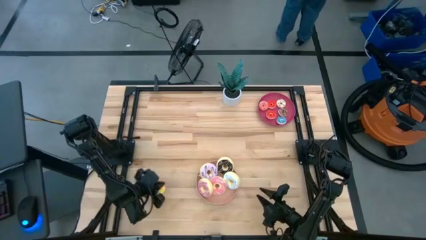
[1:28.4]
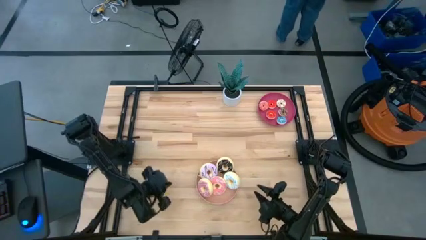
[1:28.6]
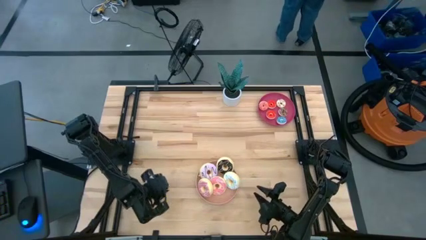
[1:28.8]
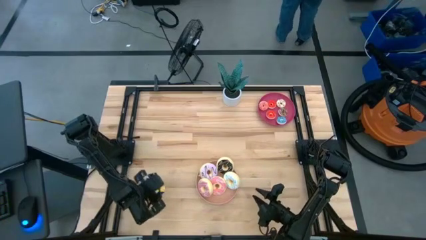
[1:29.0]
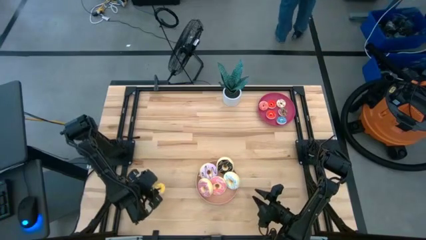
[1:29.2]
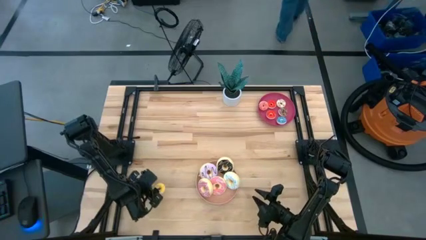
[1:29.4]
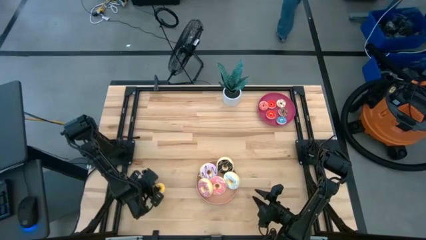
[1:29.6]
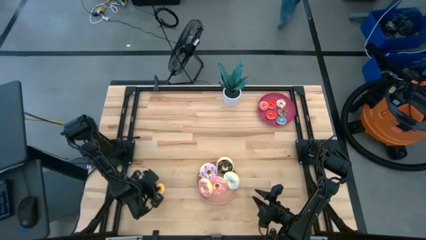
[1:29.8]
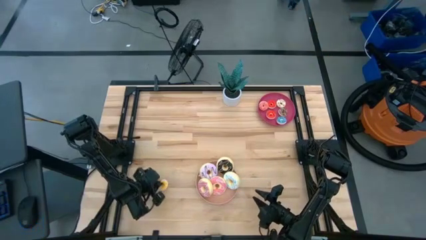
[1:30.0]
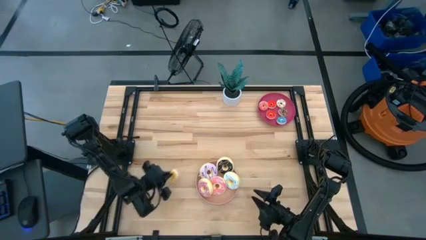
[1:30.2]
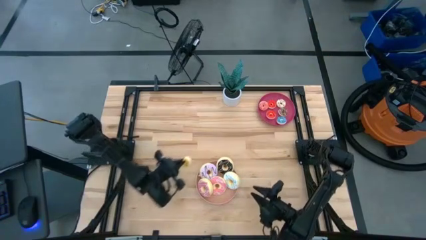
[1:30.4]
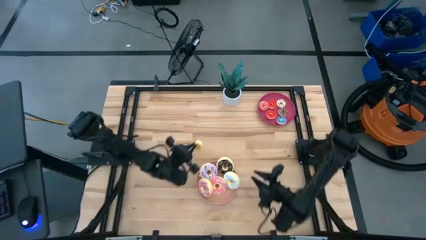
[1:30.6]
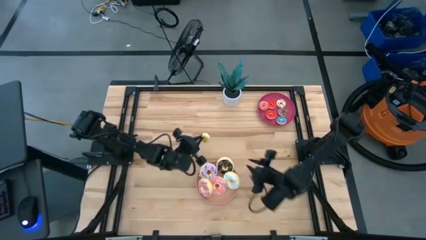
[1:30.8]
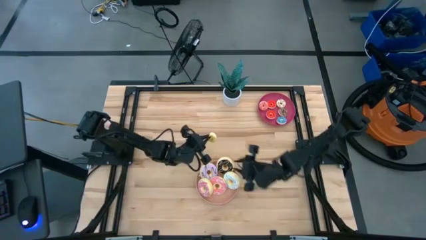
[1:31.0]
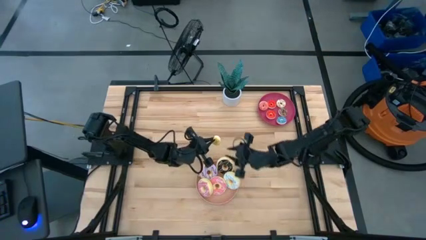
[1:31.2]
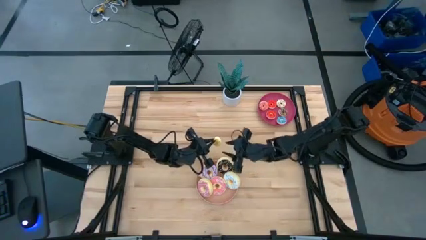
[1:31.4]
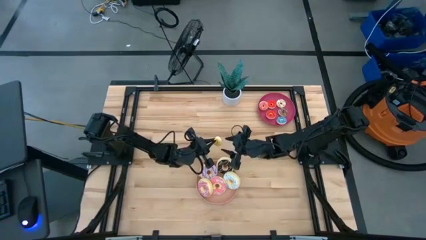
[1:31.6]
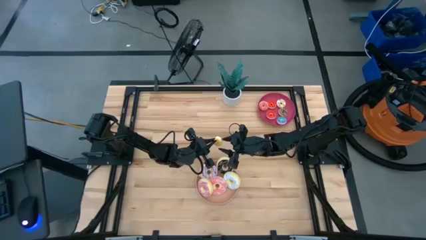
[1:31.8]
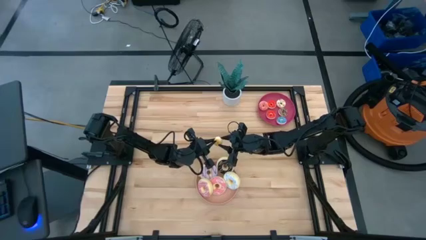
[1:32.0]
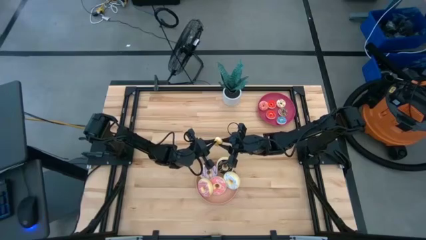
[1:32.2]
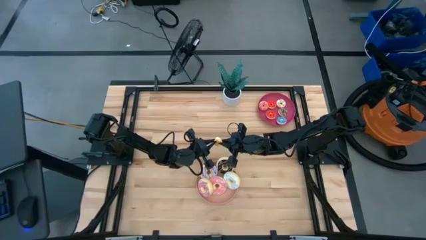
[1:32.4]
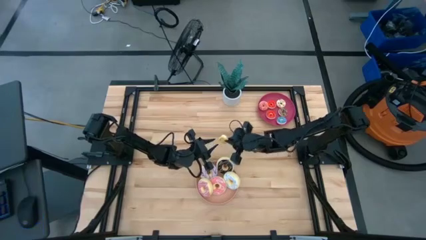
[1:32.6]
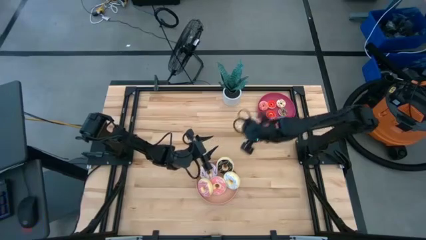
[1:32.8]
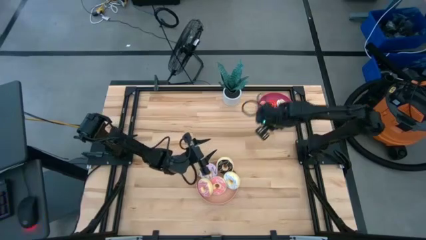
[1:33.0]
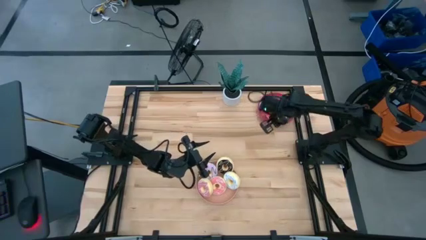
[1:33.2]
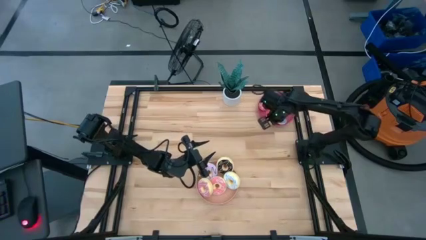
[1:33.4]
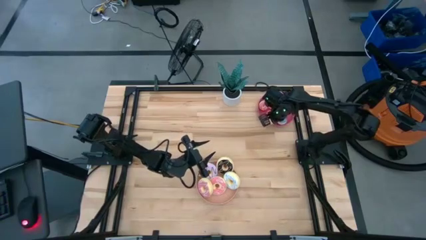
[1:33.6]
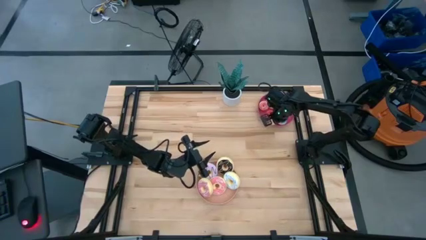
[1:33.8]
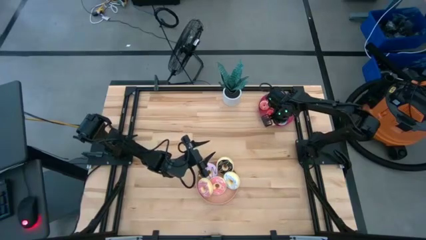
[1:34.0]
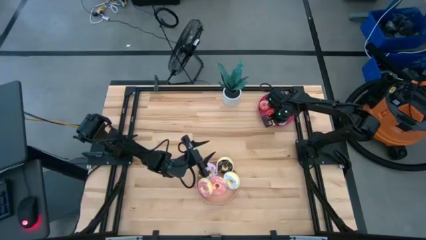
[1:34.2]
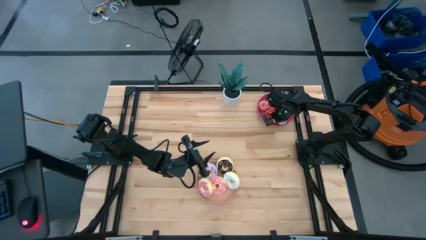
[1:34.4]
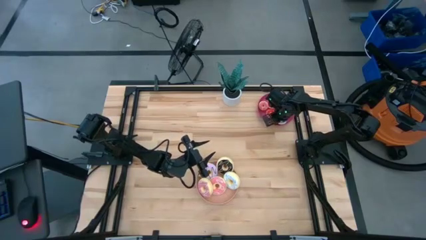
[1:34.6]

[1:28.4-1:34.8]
Task: Pick & Place donuts
Put the small yellow donut on the red plate

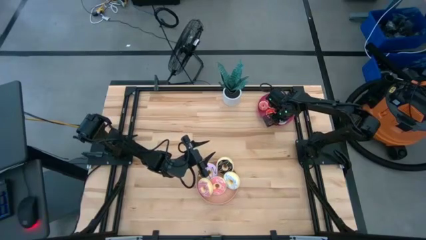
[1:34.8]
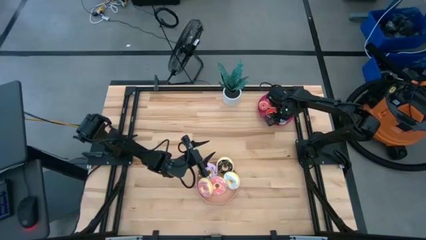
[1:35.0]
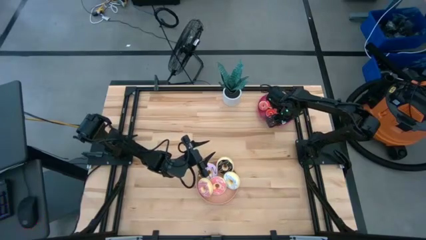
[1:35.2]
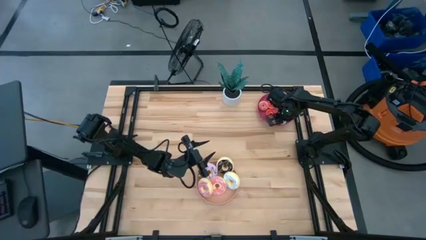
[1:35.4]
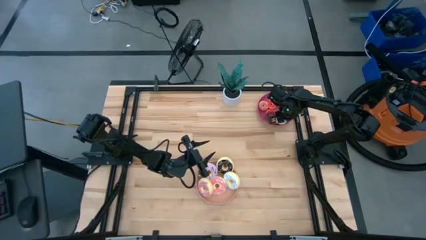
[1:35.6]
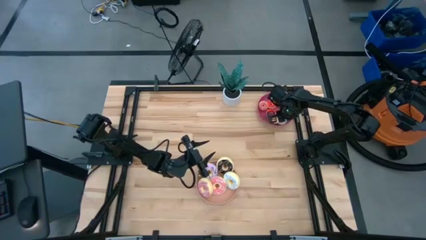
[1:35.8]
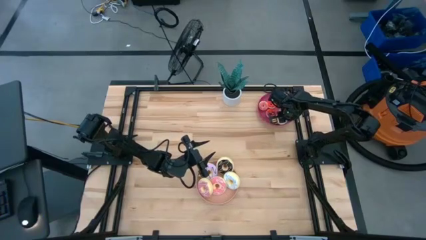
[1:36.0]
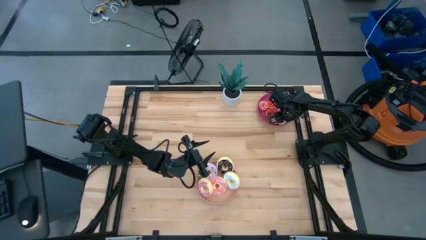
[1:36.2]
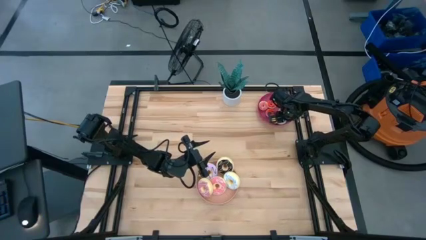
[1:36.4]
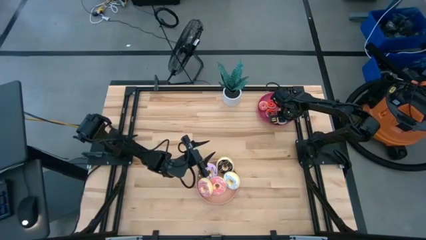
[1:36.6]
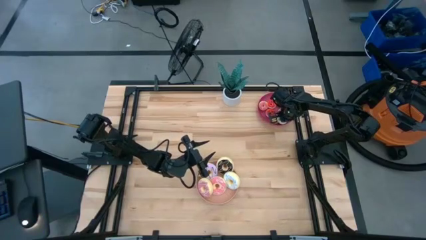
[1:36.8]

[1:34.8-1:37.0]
Adjust the small blue donut on the red plate

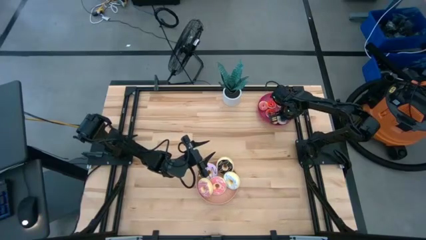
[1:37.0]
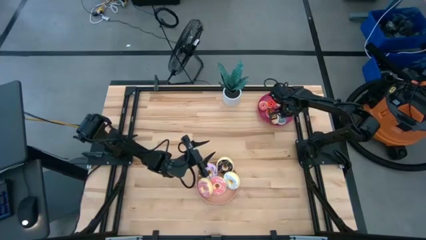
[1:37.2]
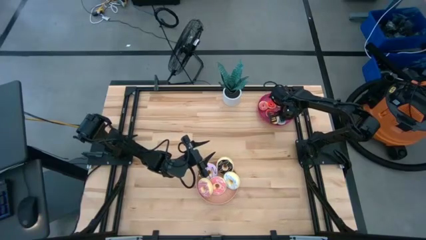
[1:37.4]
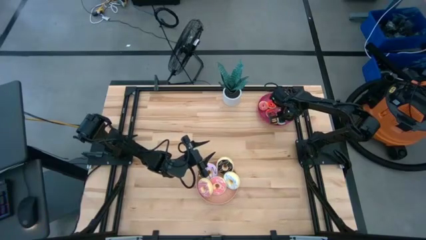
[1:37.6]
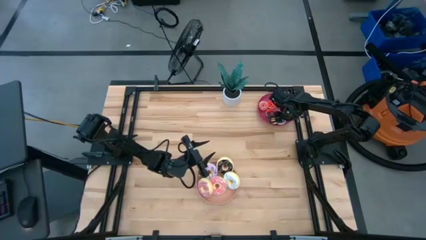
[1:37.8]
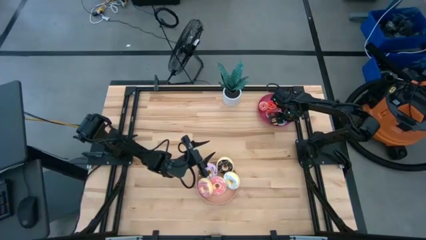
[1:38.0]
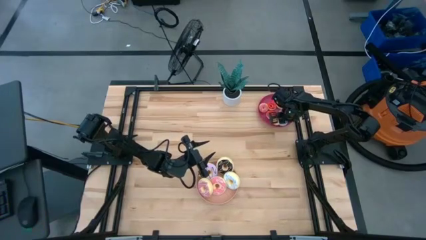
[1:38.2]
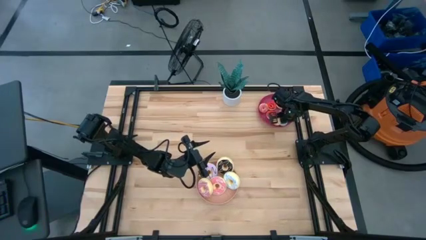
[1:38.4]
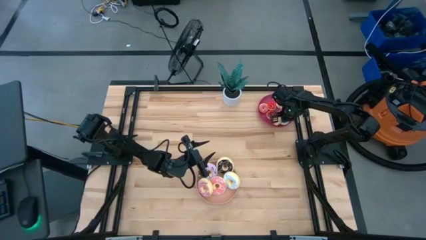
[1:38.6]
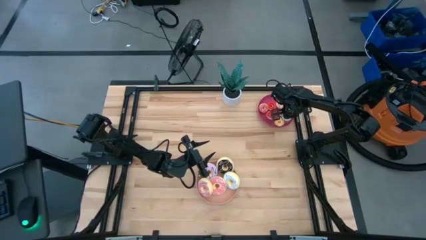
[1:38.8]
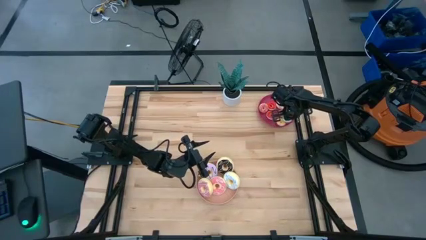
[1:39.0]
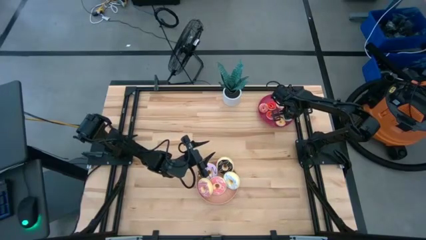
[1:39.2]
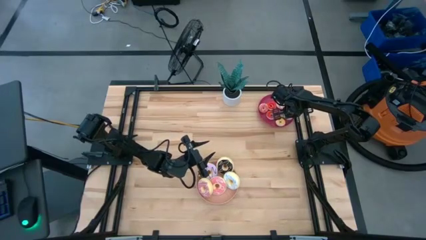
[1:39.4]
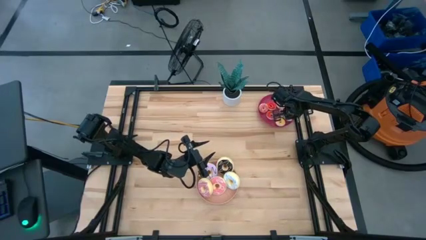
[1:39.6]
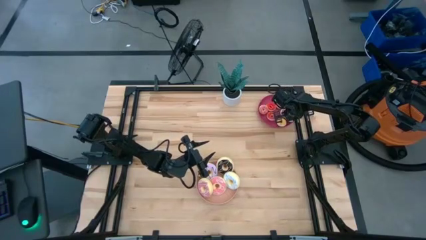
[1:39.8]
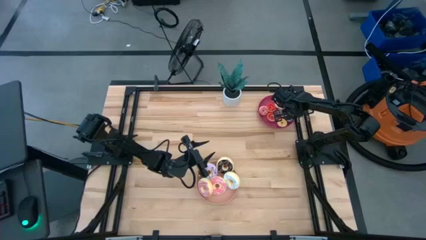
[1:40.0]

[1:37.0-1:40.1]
Adjust the small blue donut on the red plate

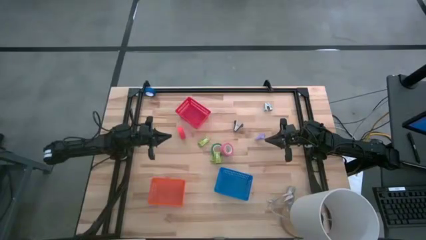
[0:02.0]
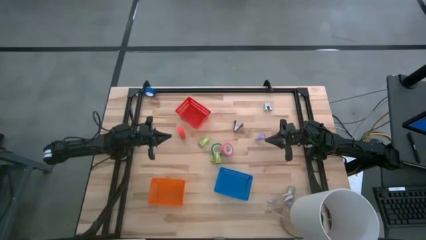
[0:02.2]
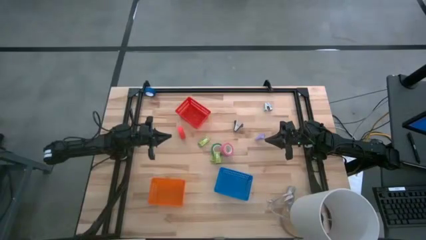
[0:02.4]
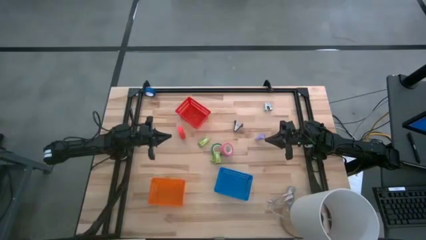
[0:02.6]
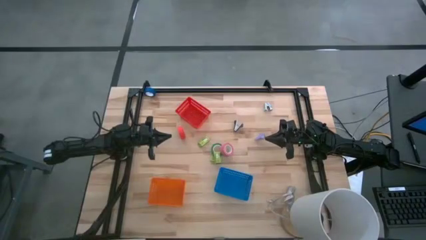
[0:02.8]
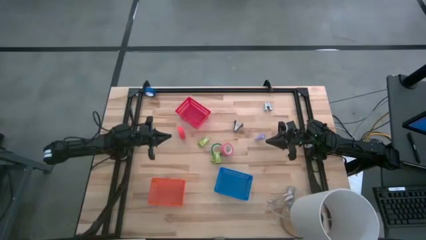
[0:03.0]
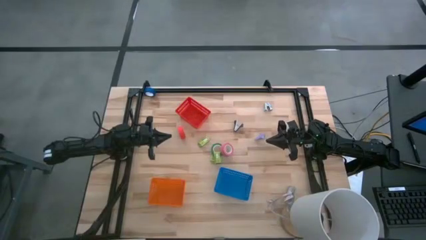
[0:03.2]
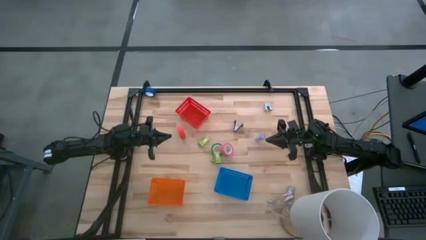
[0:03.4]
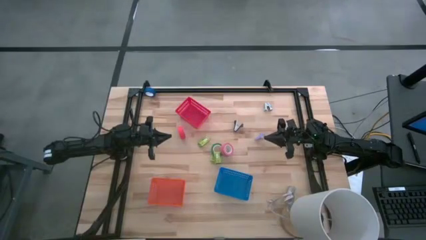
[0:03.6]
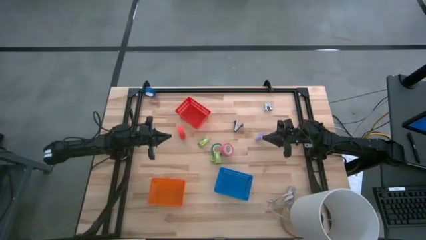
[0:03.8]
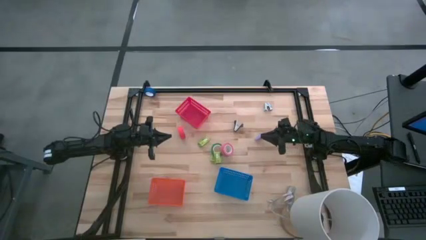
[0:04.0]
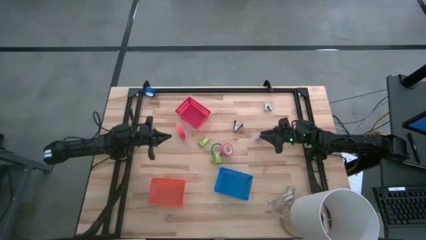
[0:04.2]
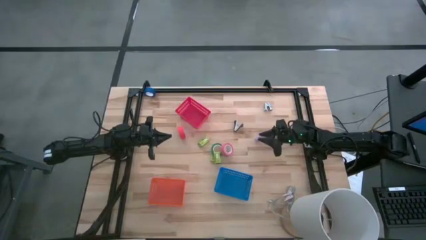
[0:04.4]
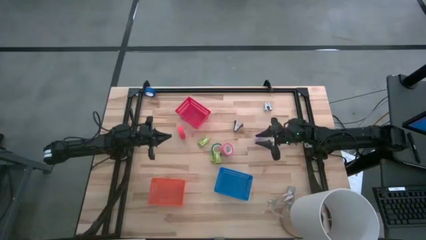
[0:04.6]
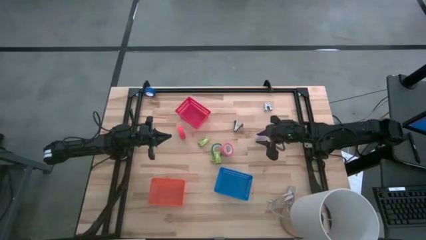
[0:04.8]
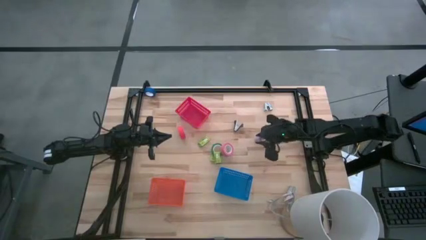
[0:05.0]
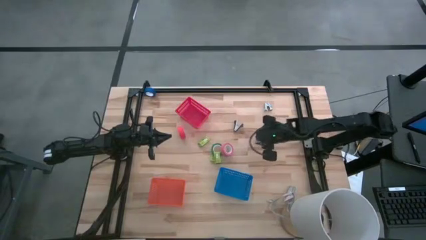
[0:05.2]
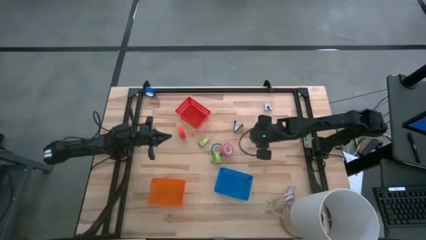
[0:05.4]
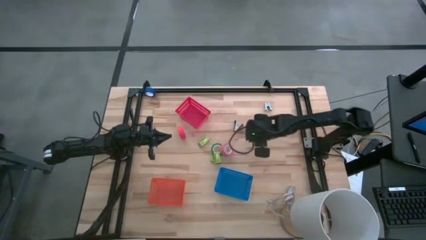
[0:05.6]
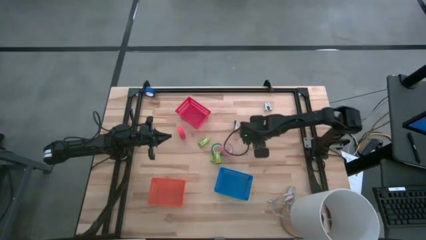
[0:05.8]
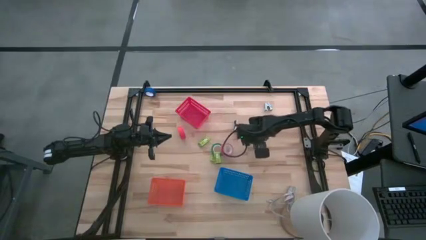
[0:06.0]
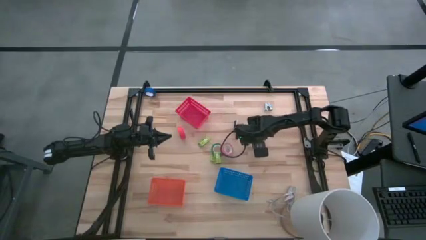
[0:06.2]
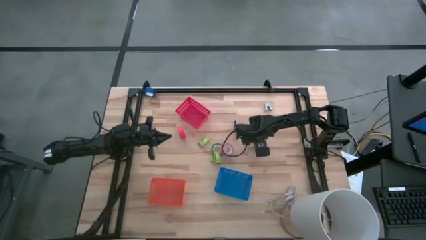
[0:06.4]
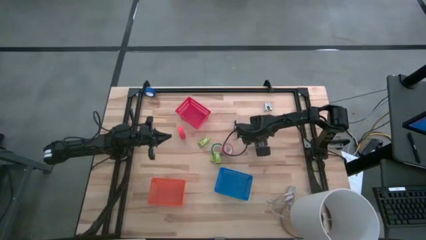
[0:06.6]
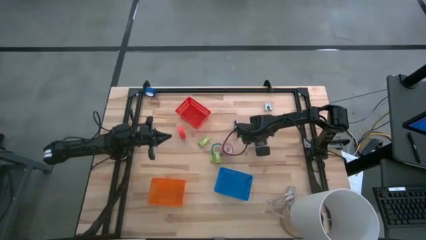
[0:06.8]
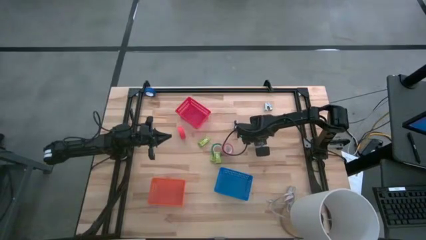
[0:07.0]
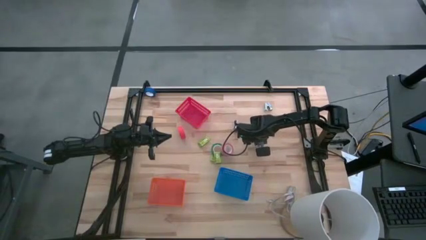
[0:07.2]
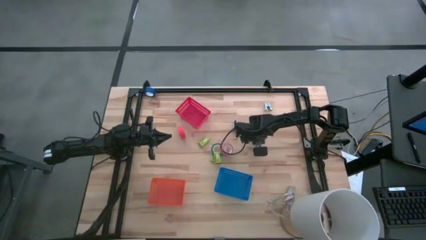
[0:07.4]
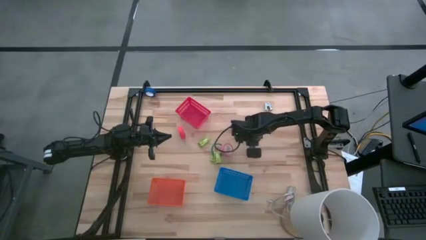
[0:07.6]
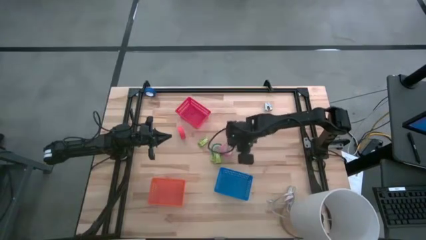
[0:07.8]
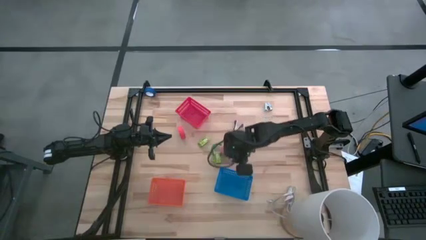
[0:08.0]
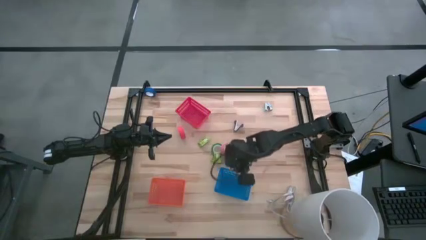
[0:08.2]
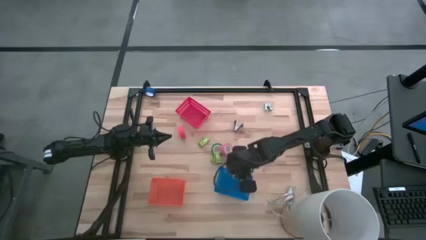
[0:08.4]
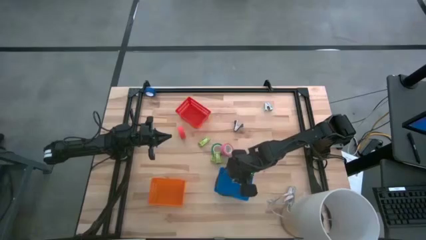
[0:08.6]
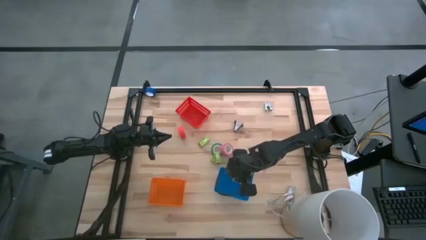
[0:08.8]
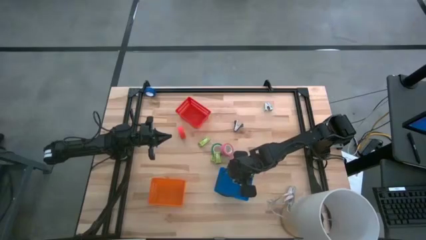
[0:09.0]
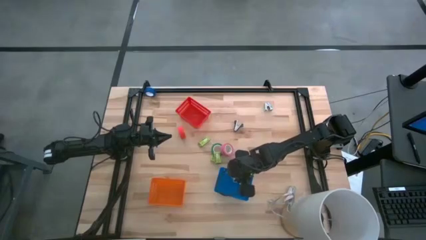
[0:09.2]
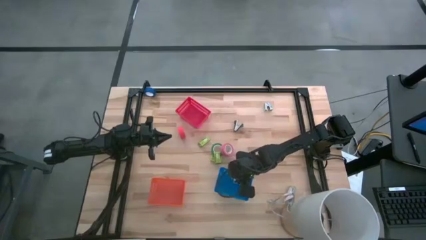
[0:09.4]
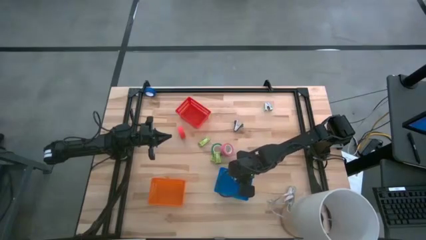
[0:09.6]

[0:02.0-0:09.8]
Task: Pick and place Stapler, Stapler remover, tape
Put the purple stapler remover into the blue bin
